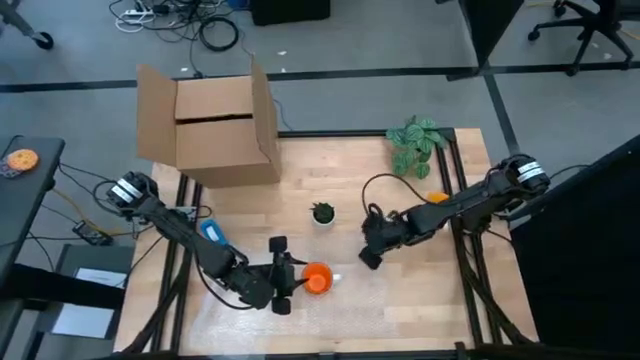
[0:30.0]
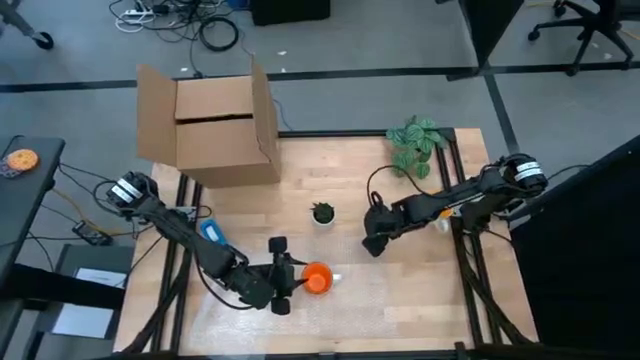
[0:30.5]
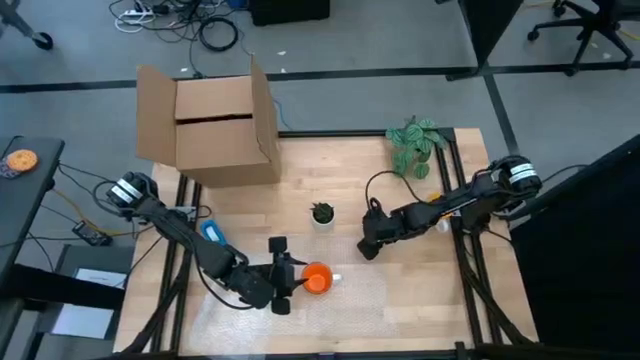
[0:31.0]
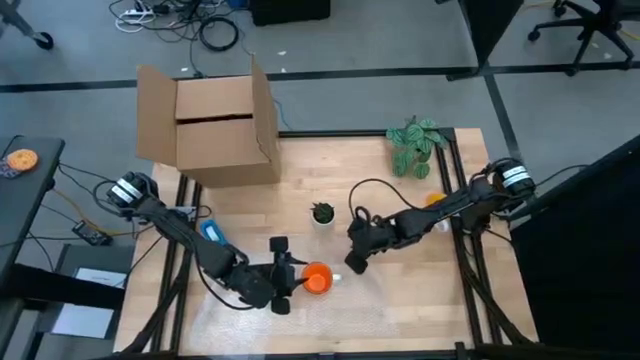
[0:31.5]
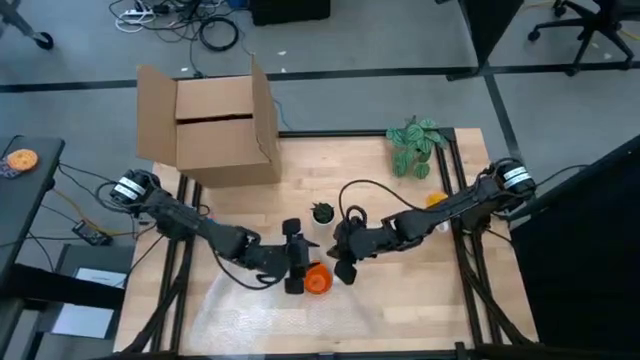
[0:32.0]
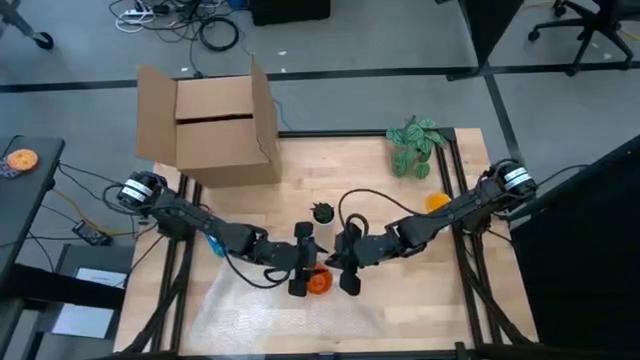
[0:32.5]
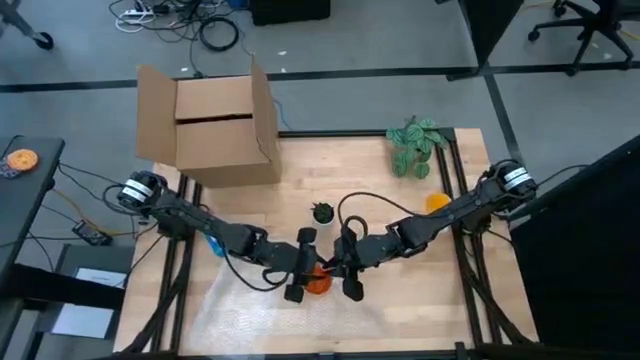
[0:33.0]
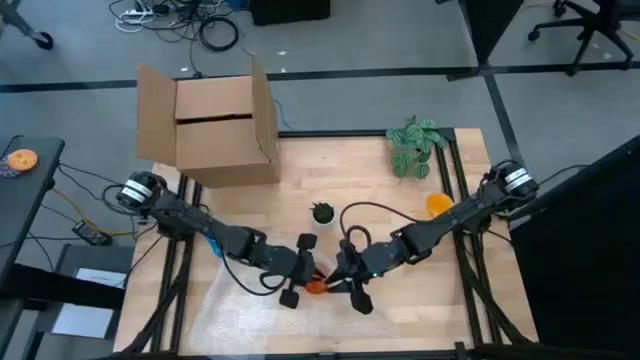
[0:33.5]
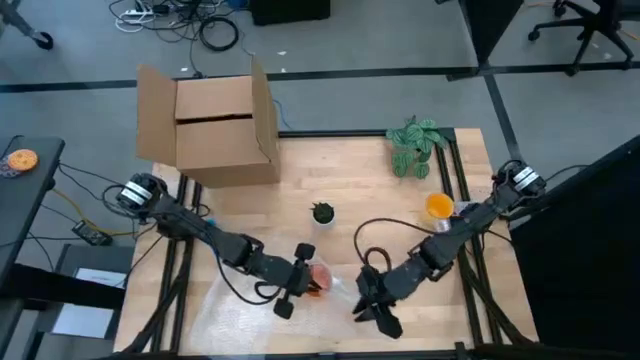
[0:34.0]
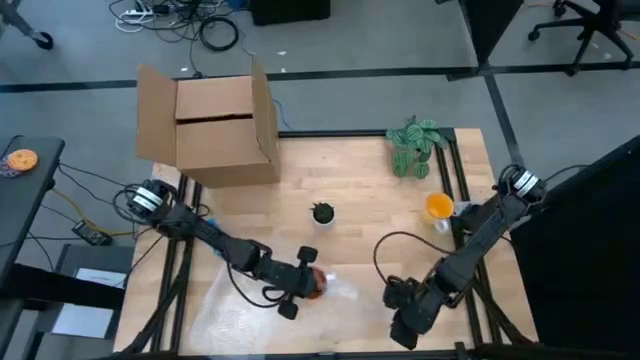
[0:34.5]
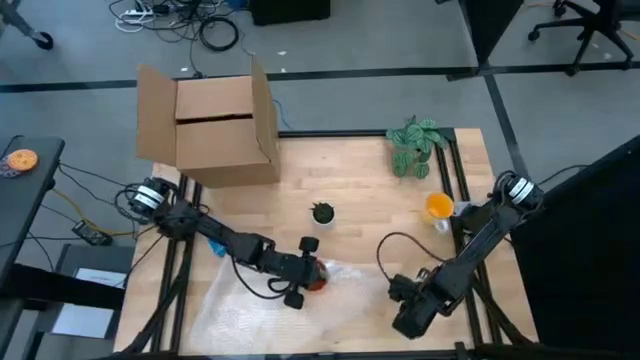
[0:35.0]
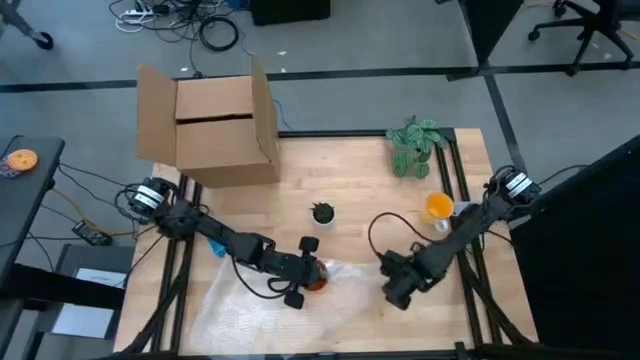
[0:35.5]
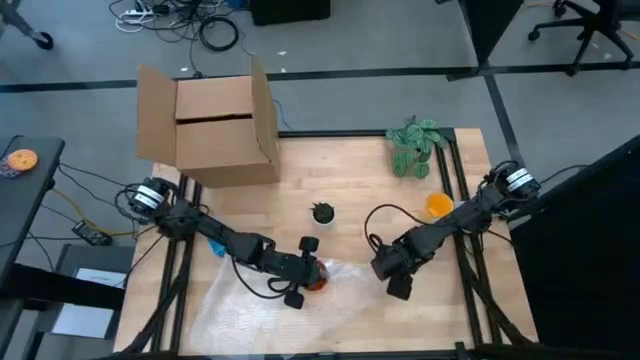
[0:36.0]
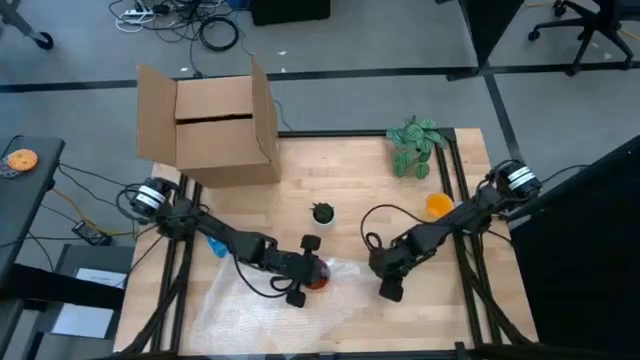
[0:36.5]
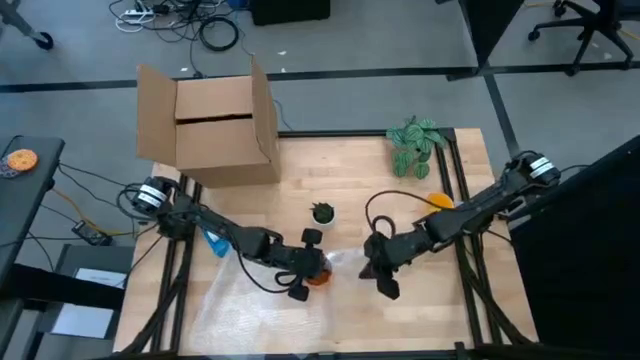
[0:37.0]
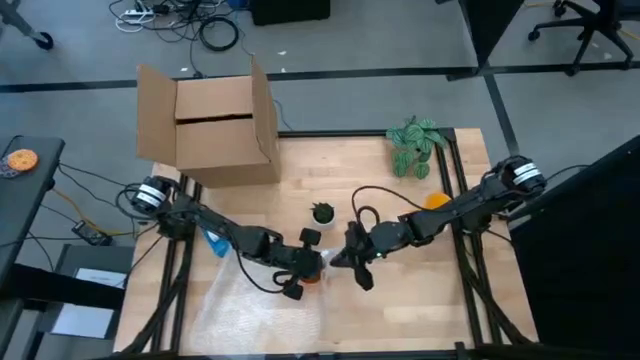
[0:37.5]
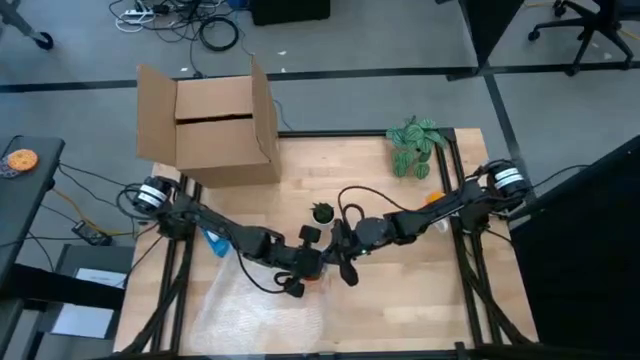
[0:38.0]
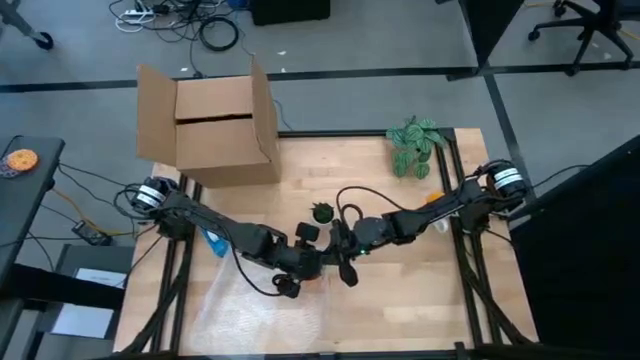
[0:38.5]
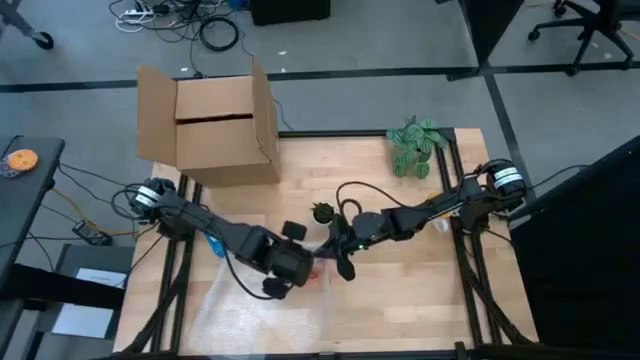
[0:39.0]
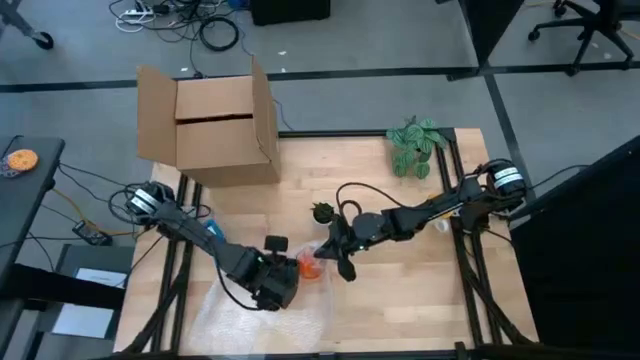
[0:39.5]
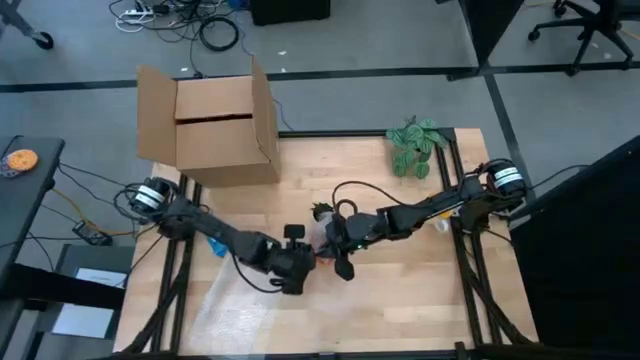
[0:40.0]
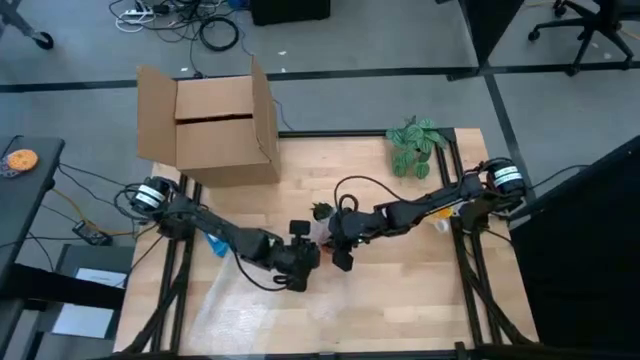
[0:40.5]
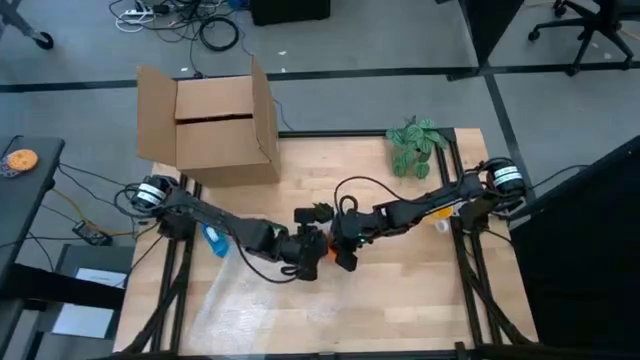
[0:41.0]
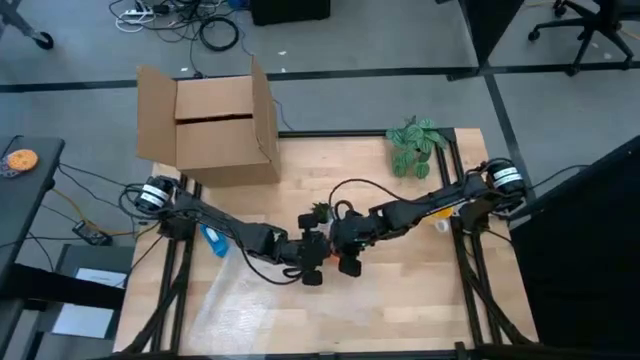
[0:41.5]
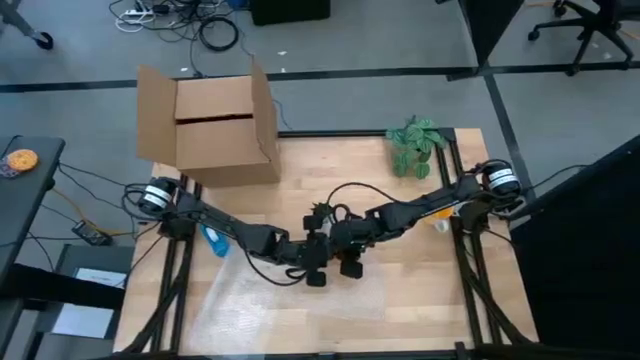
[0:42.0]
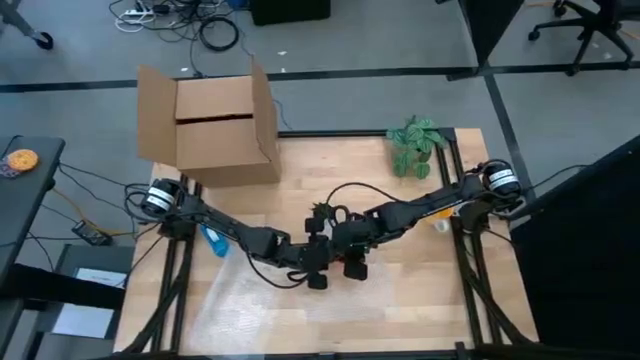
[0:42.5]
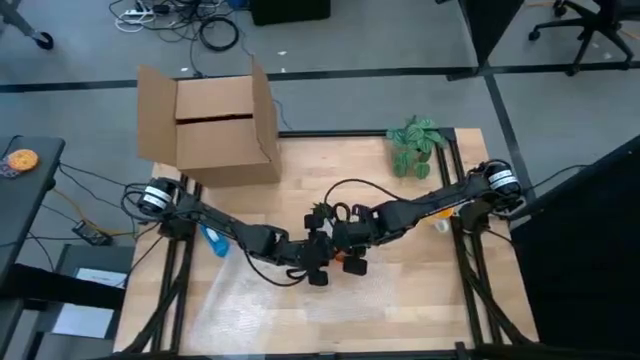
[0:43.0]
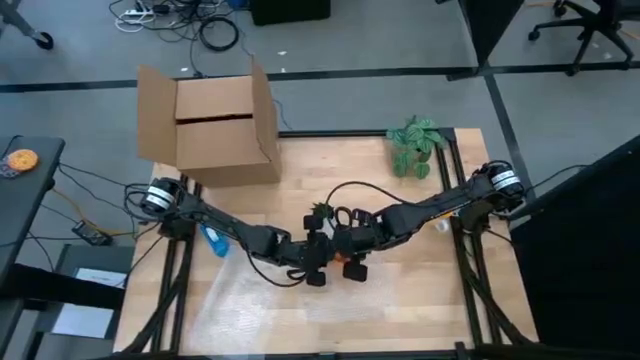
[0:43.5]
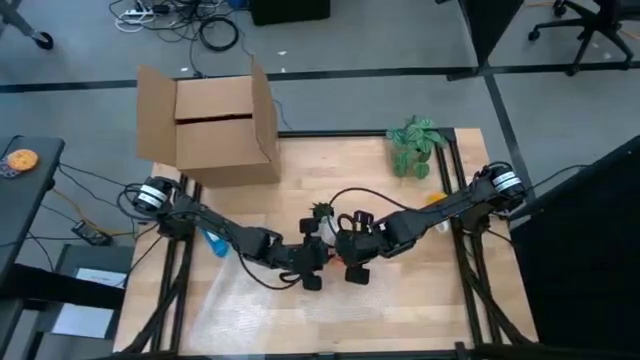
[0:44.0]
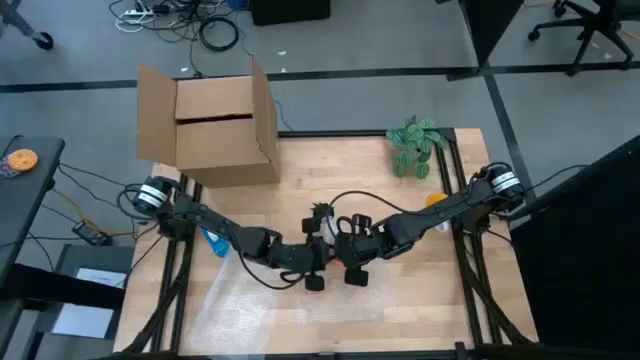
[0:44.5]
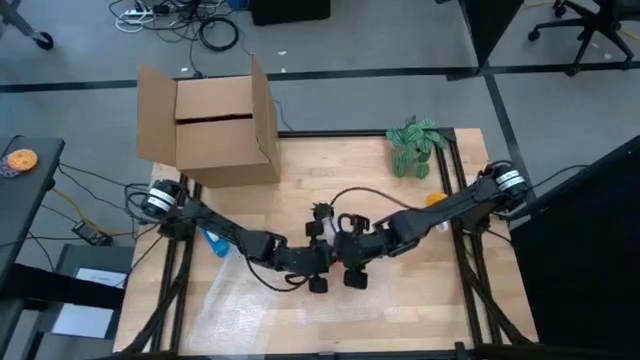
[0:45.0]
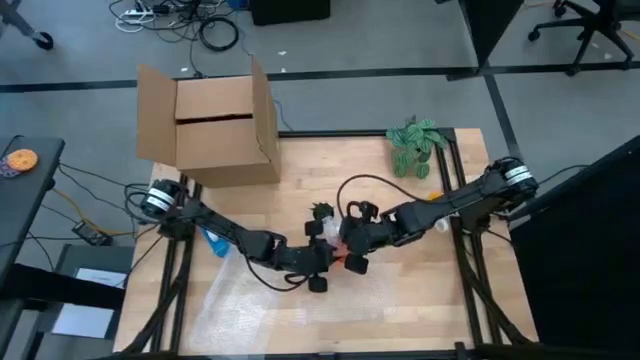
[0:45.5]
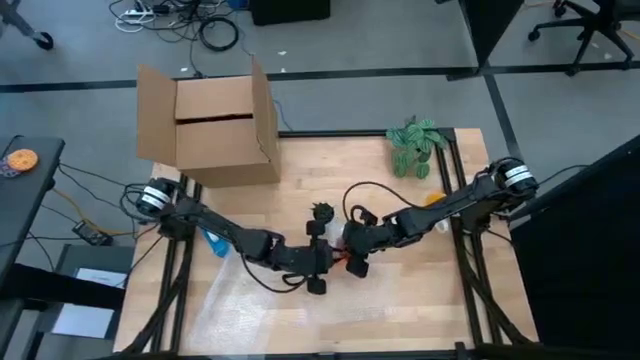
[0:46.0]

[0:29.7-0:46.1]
Task: wrap mug
Wrap the orange mug with the transparent bubble wrap
